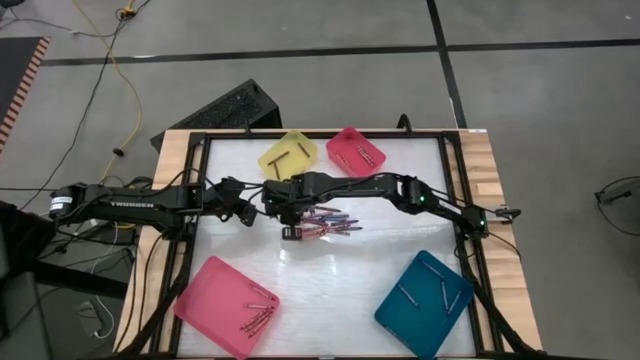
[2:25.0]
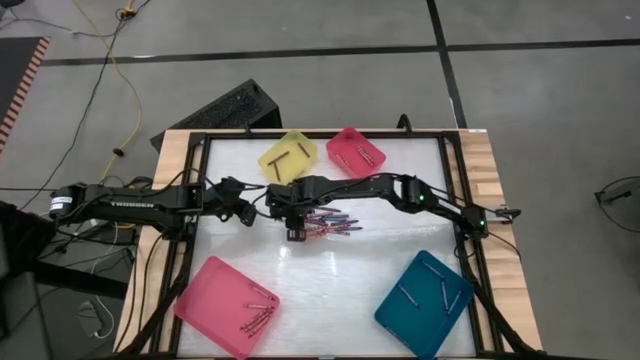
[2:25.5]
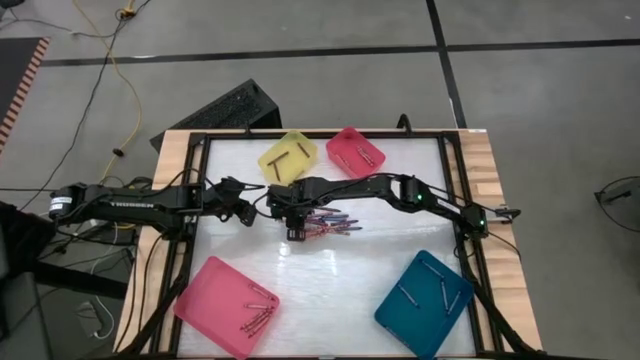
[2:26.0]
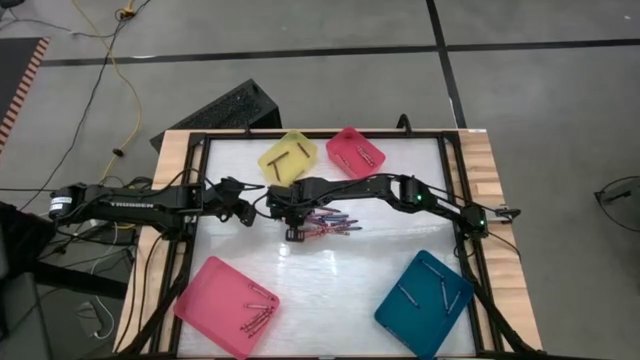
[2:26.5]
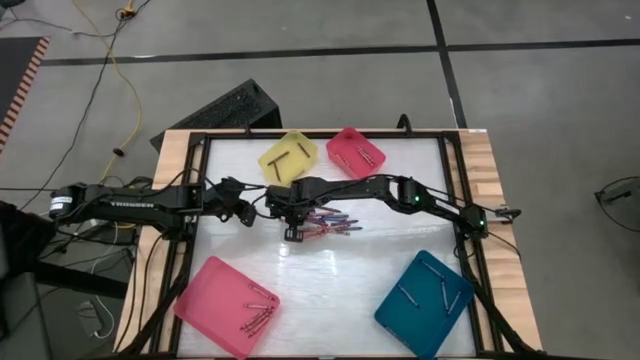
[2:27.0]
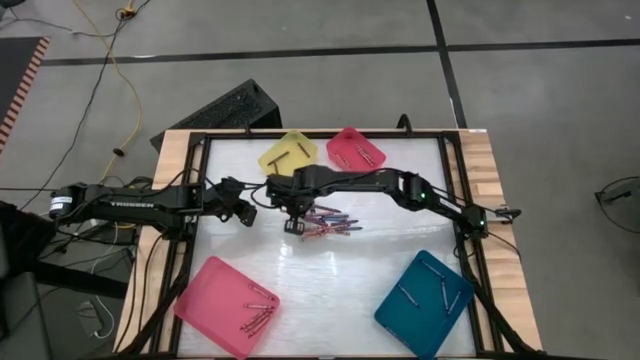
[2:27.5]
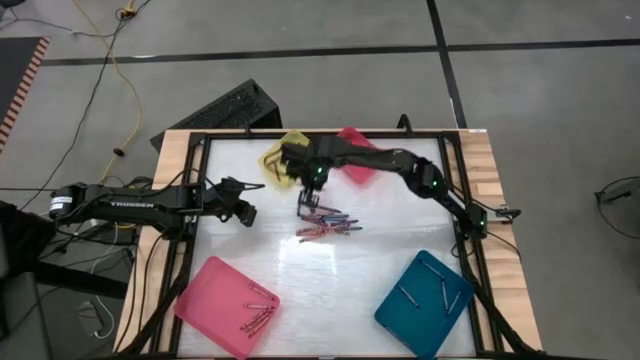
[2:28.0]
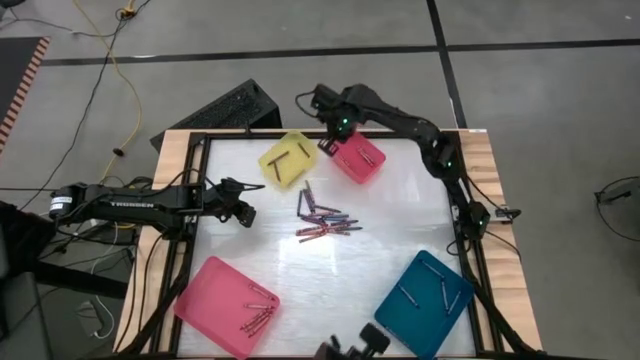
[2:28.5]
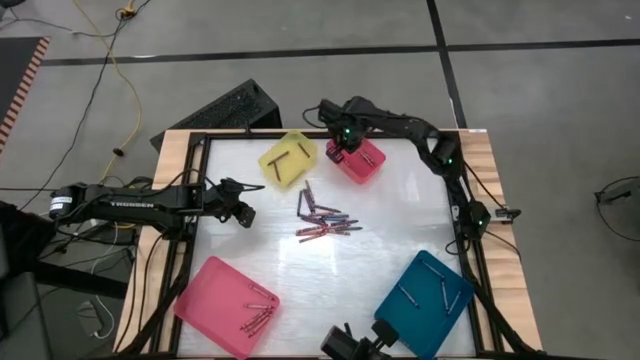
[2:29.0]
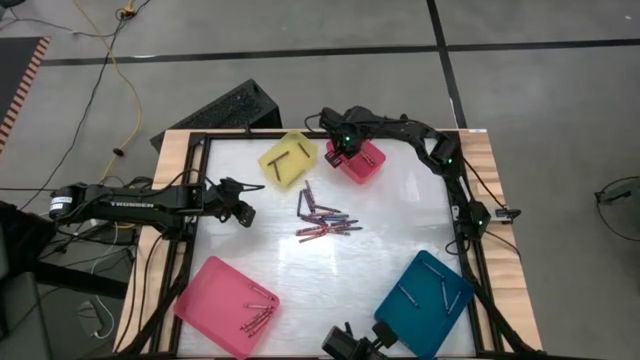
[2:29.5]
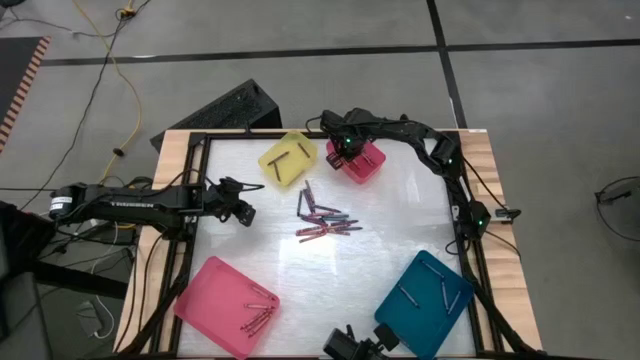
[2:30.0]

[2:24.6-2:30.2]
Task: Sort crayons
Put the pink crayon into the red bin

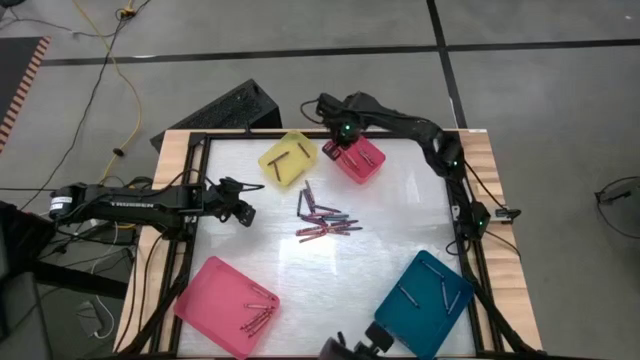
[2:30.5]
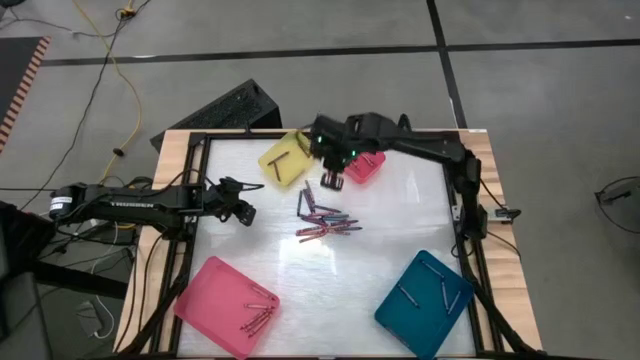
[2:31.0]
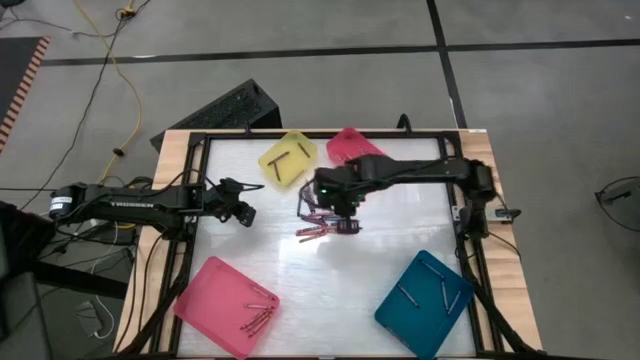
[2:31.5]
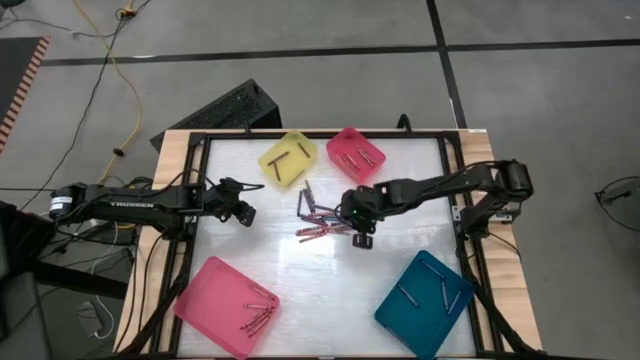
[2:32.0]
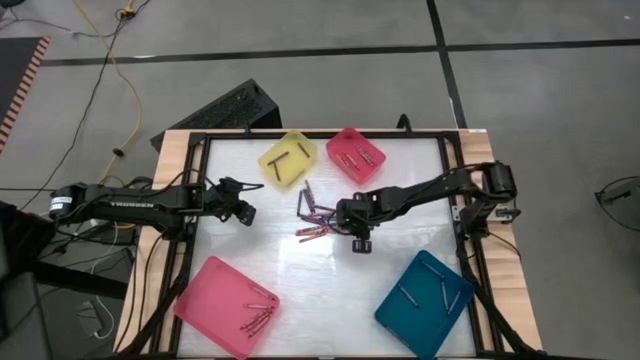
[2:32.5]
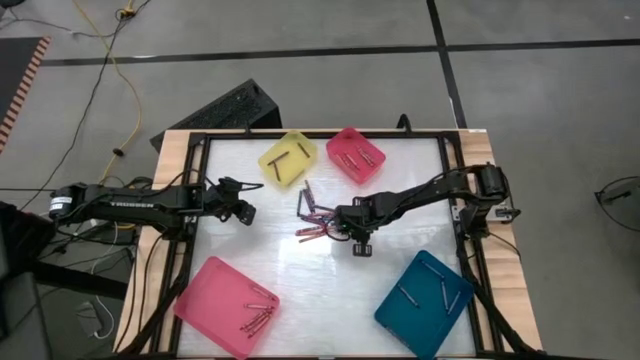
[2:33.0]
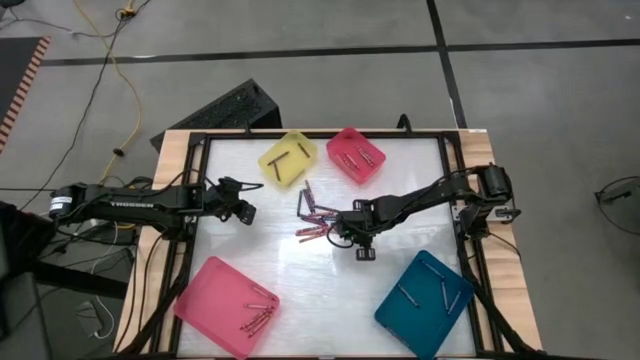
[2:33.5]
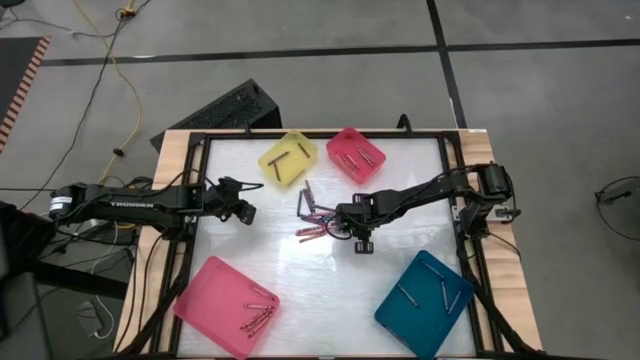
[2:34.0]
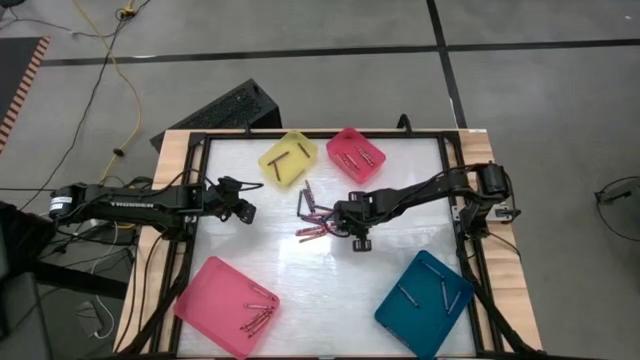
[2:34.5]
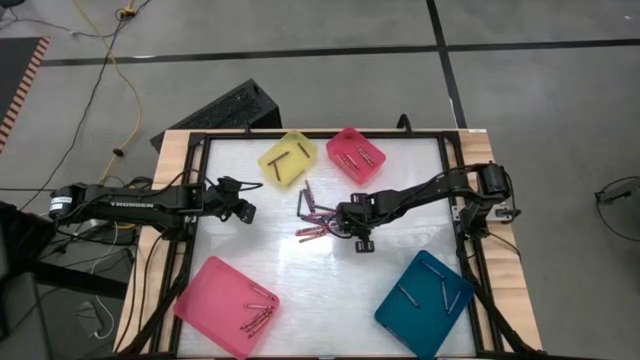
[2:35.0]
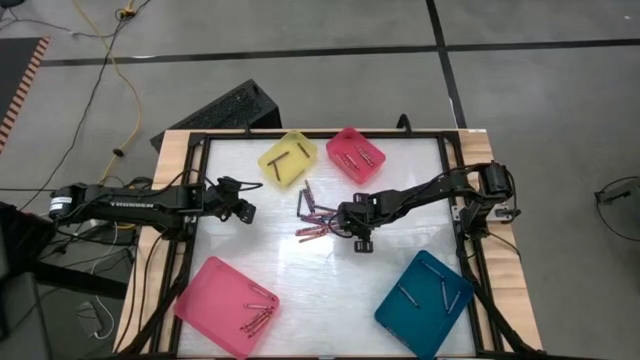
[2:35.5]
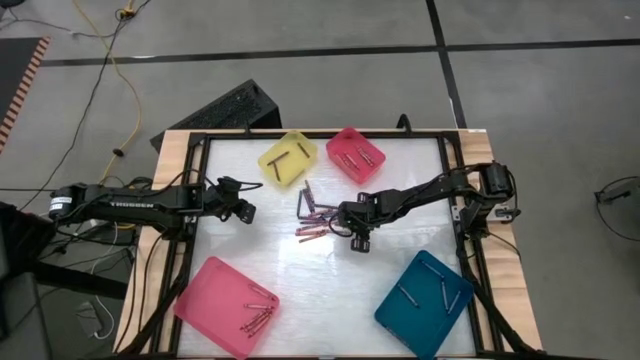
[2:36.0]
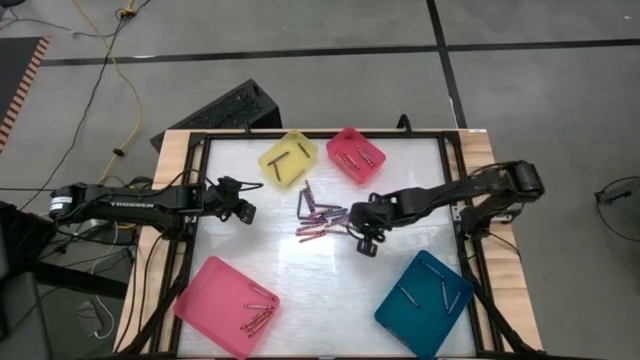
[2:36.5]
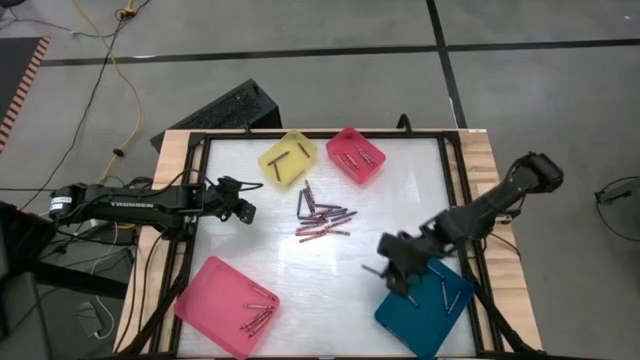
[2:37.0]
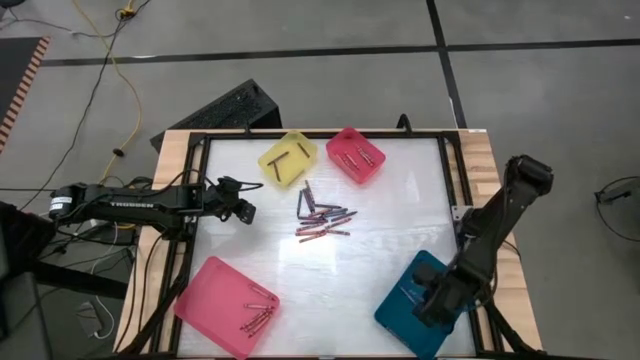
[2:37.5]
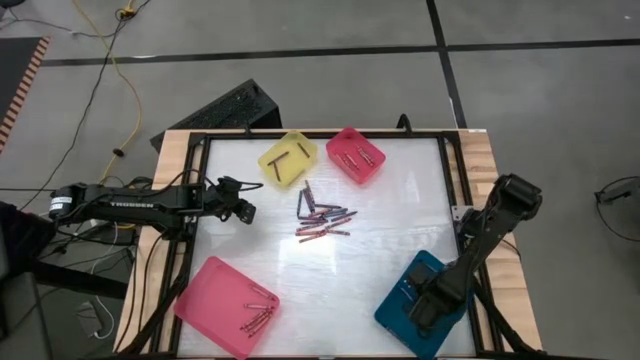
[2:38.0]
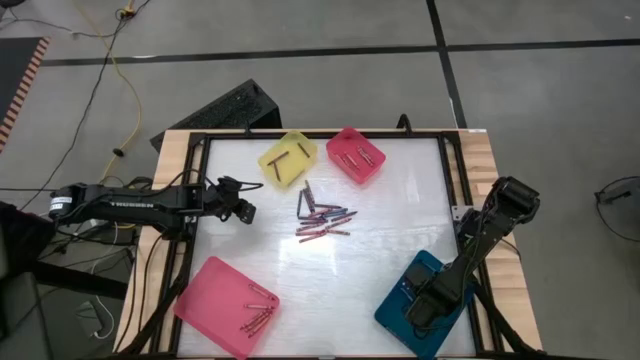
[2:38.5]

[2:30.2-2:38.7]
Put the blue crayon into the blue bin

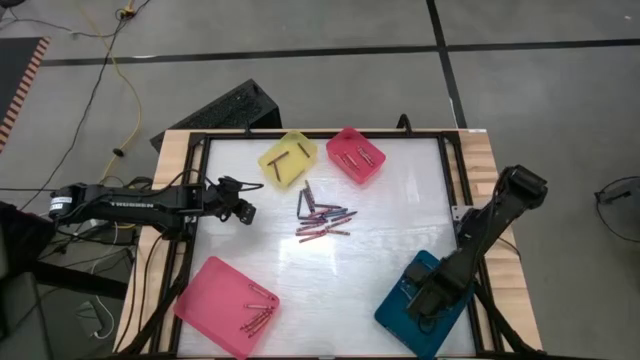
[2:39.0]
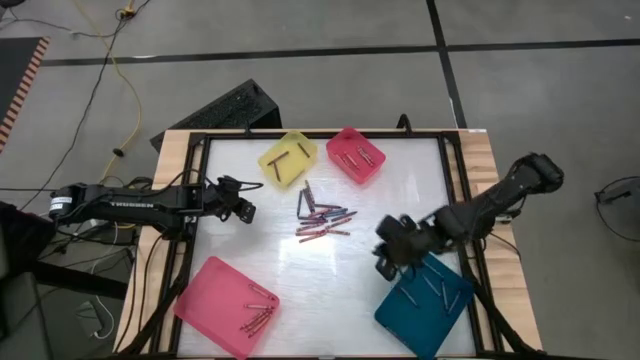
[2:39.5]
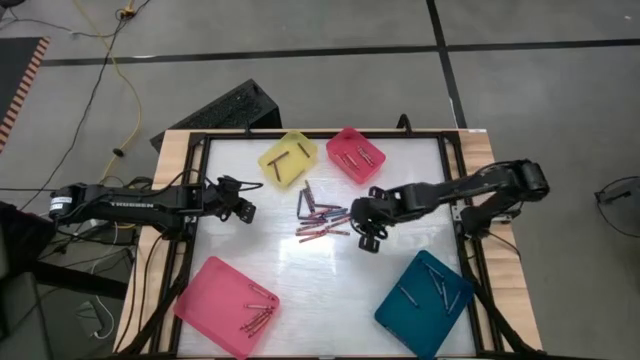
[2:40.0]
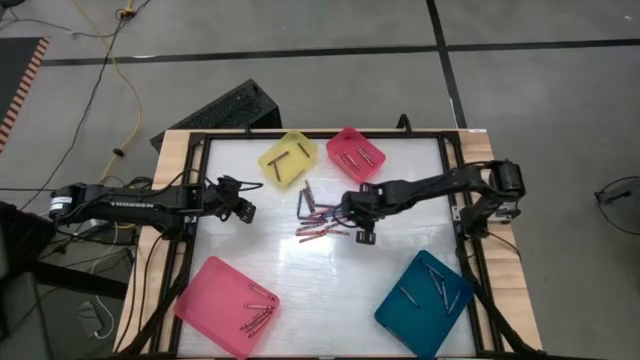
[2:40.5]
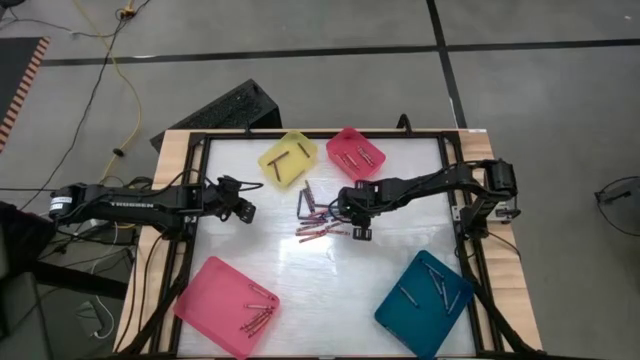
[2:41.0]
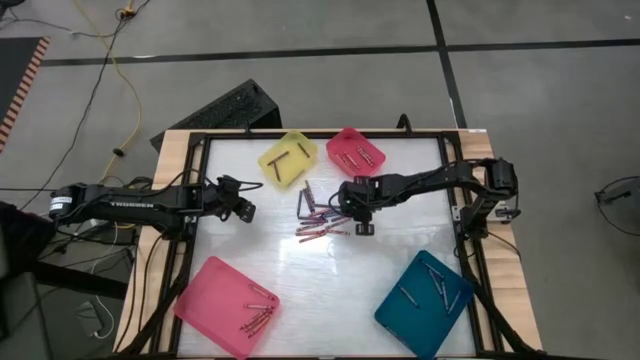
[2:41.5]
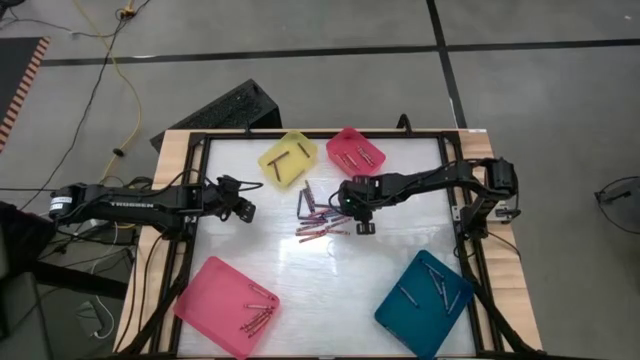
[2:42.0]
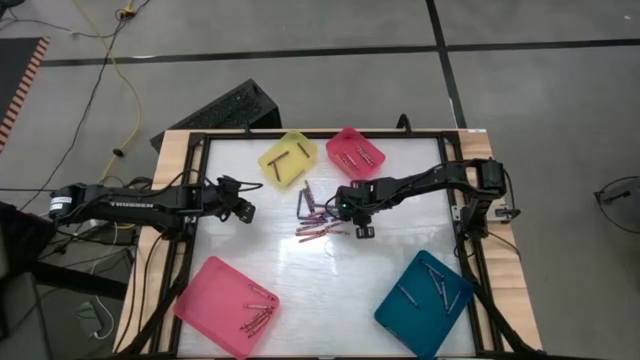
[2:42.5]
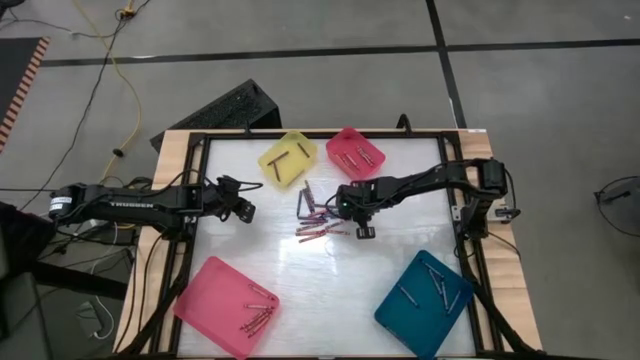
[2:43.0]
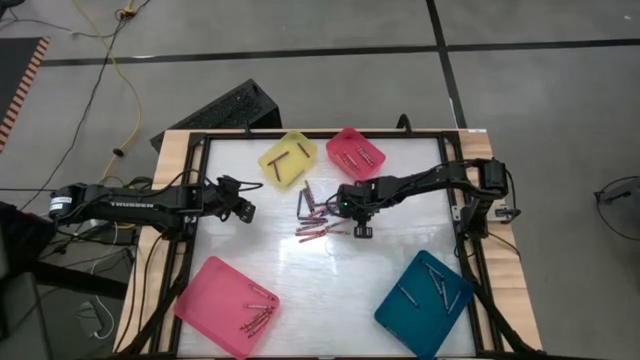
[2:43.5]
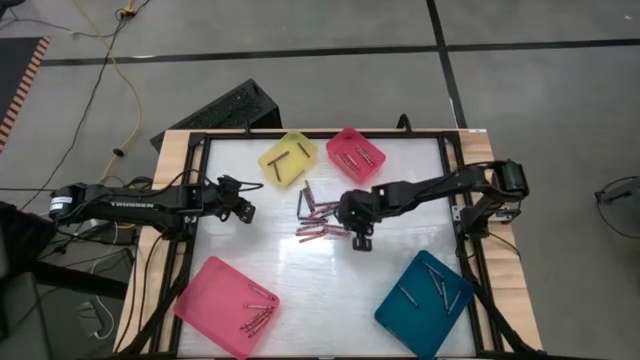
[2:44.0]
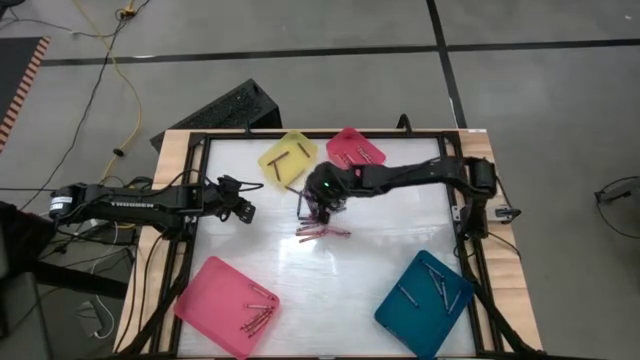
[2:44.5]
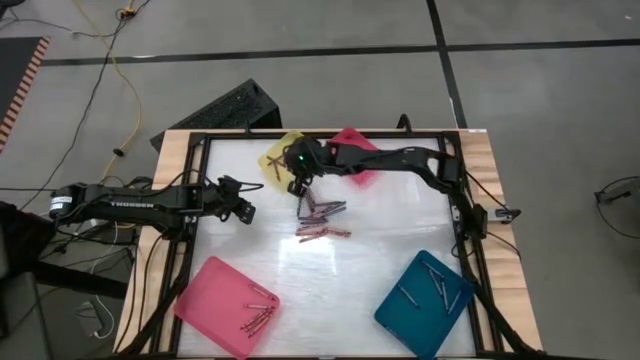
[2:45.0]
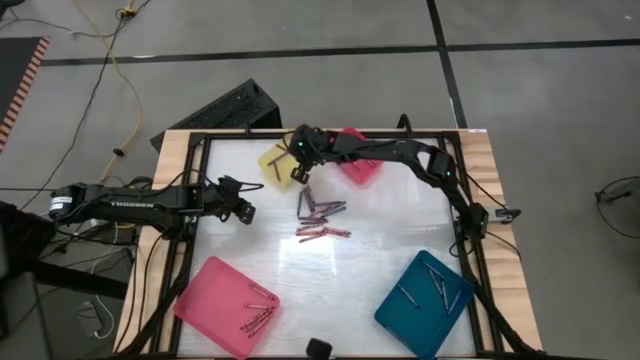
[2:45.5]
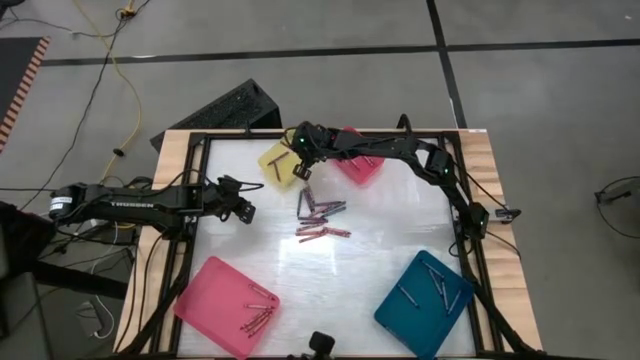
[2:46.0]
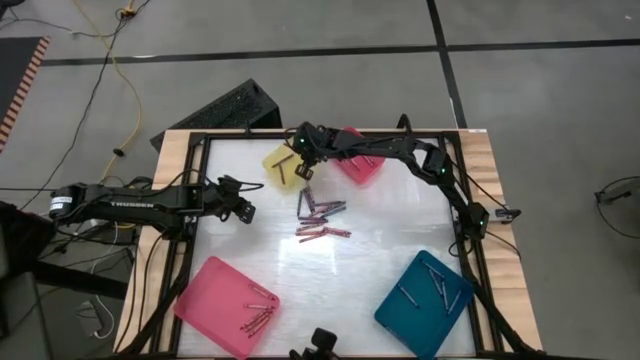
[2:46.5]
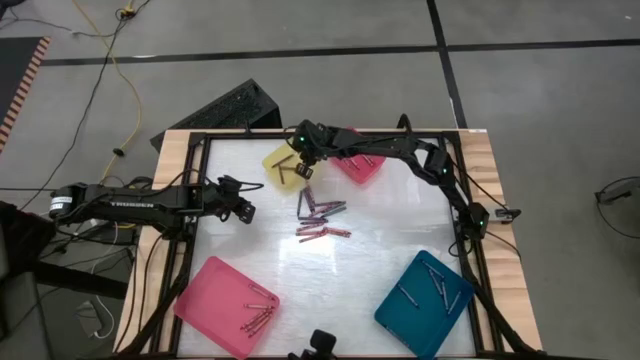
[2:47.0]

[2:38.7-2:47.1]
Put the purple crayon into the yellow bin
